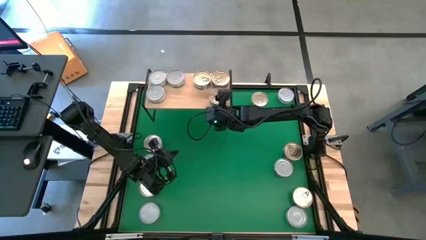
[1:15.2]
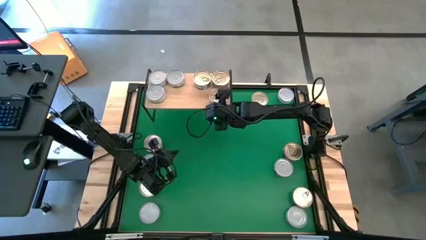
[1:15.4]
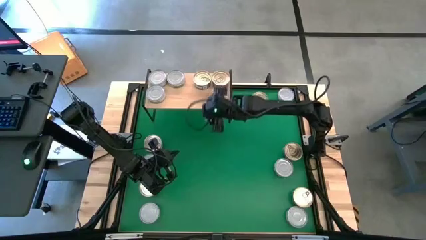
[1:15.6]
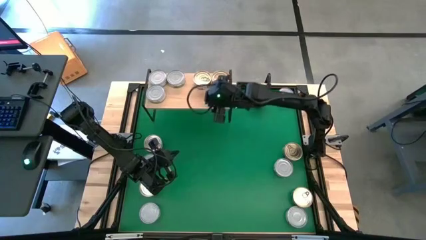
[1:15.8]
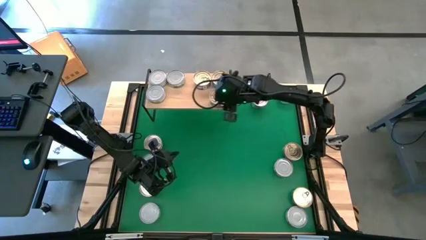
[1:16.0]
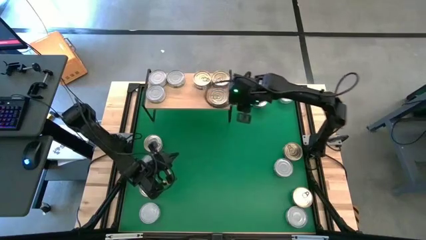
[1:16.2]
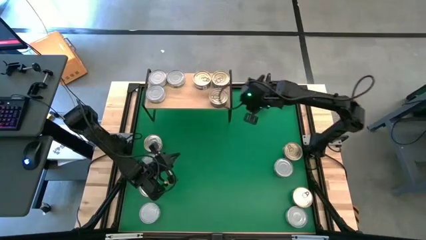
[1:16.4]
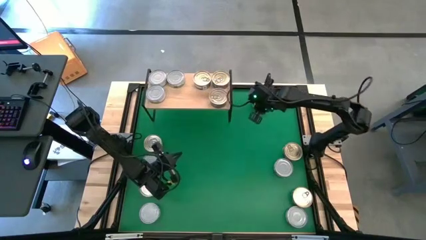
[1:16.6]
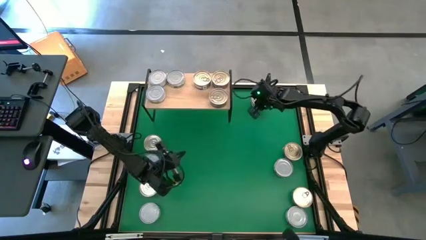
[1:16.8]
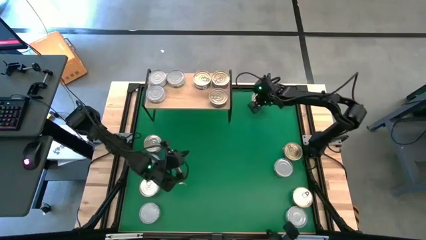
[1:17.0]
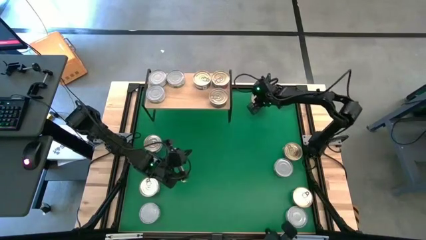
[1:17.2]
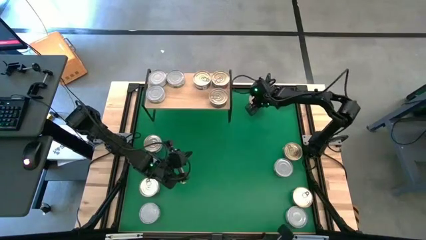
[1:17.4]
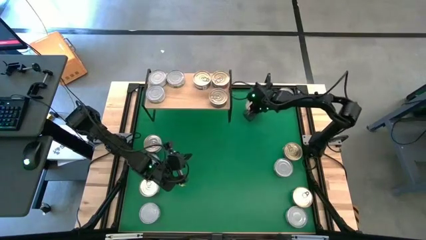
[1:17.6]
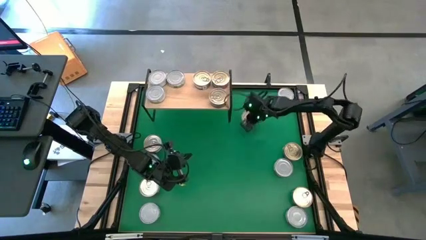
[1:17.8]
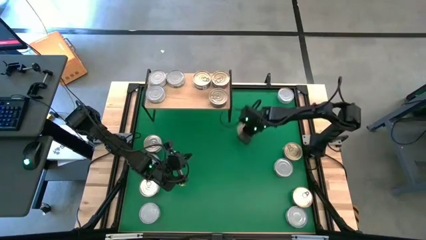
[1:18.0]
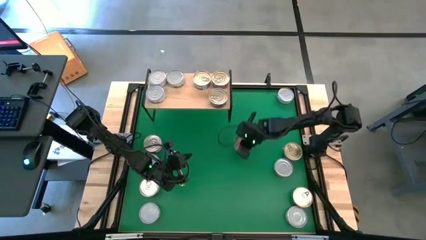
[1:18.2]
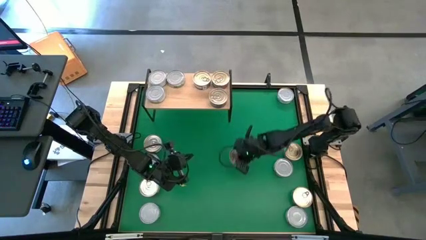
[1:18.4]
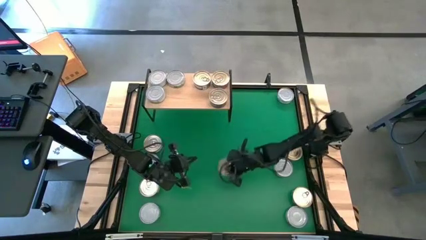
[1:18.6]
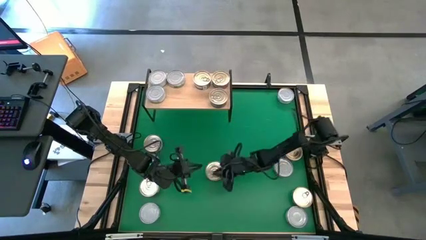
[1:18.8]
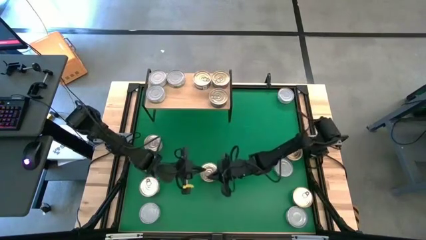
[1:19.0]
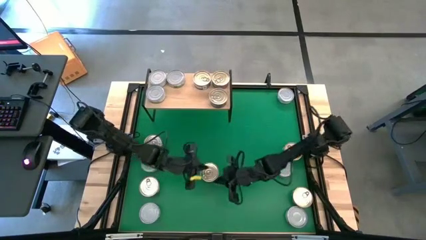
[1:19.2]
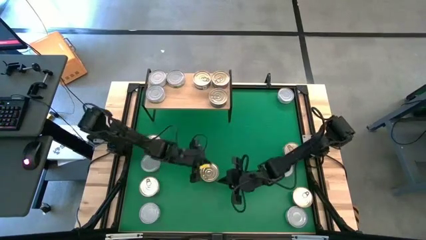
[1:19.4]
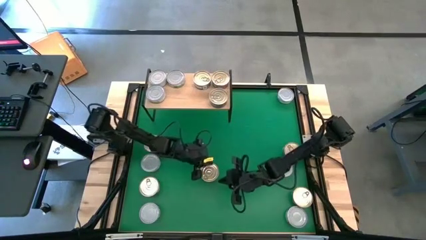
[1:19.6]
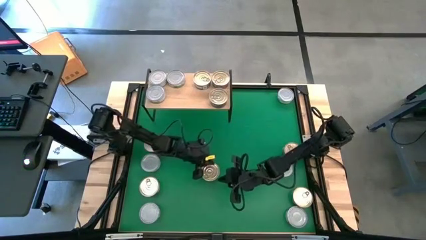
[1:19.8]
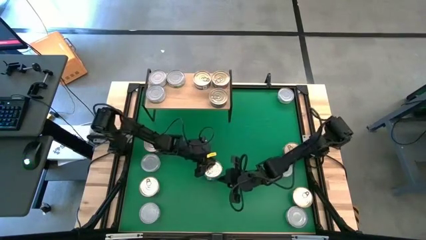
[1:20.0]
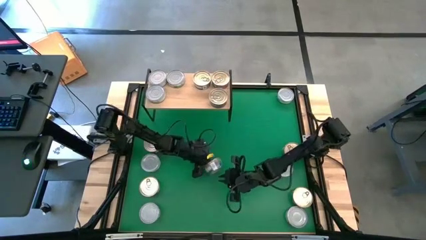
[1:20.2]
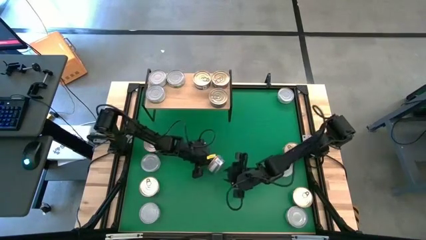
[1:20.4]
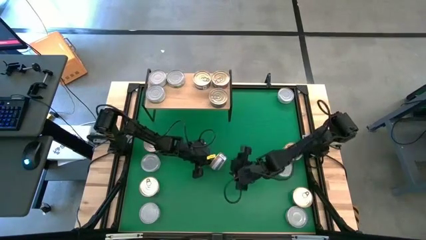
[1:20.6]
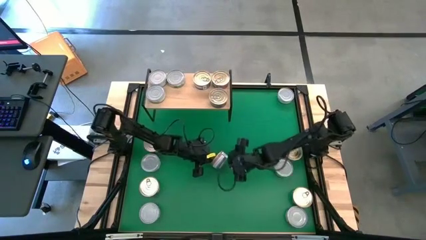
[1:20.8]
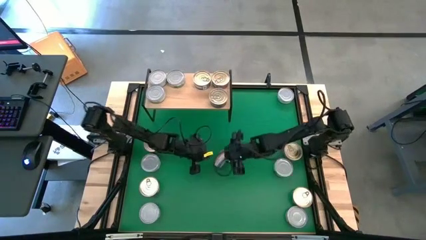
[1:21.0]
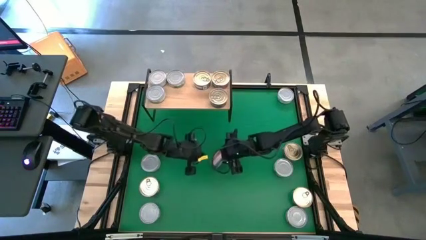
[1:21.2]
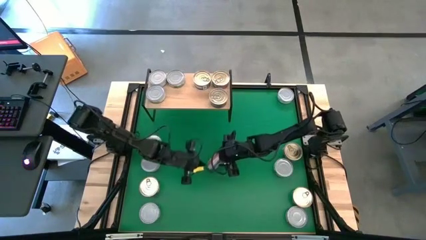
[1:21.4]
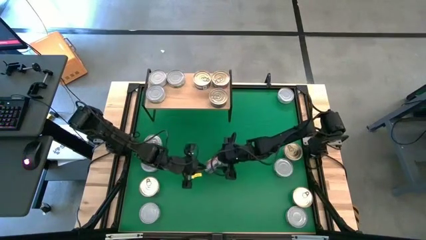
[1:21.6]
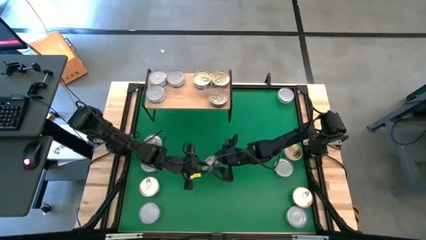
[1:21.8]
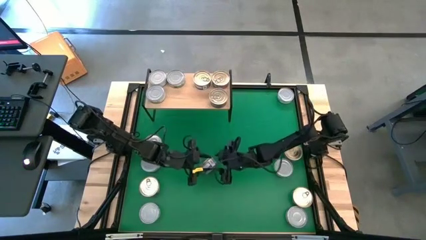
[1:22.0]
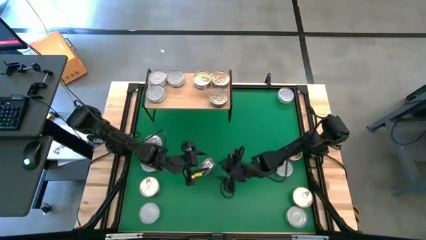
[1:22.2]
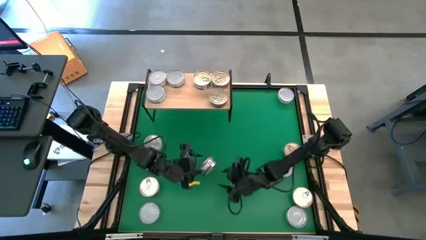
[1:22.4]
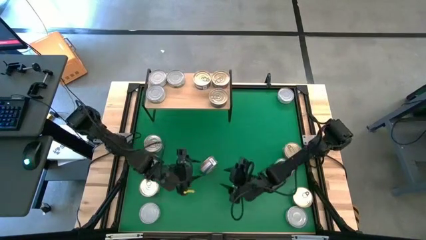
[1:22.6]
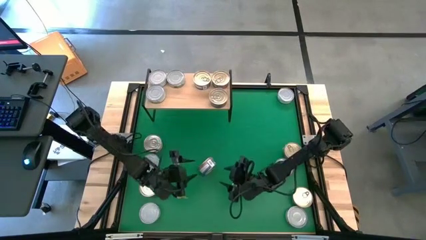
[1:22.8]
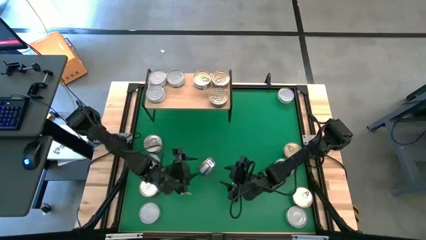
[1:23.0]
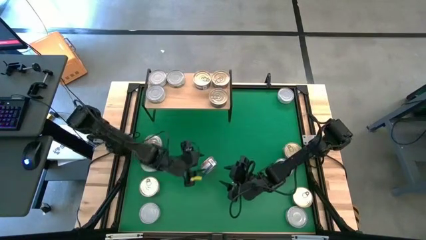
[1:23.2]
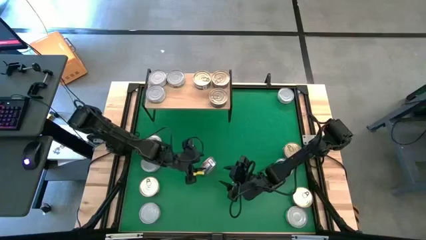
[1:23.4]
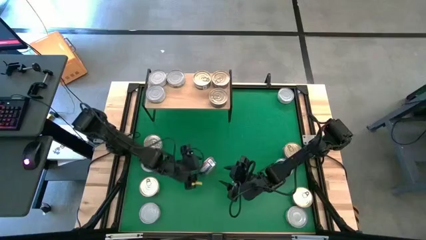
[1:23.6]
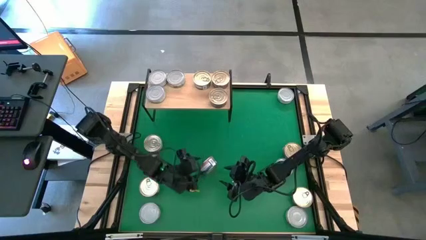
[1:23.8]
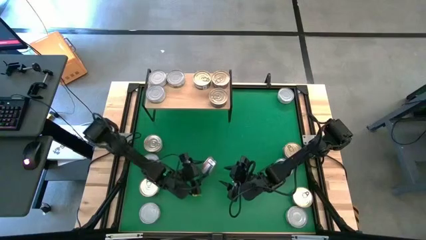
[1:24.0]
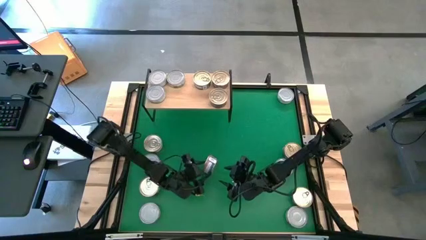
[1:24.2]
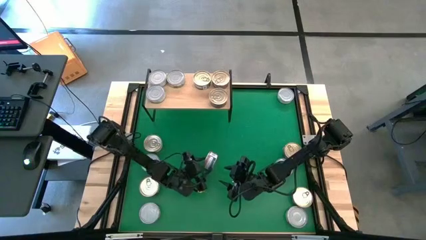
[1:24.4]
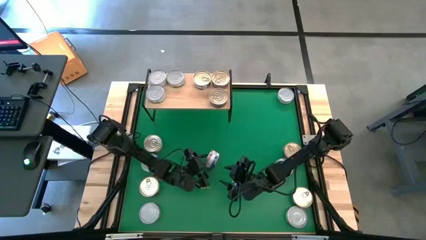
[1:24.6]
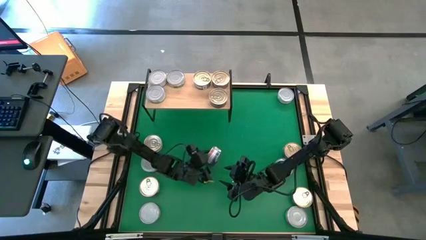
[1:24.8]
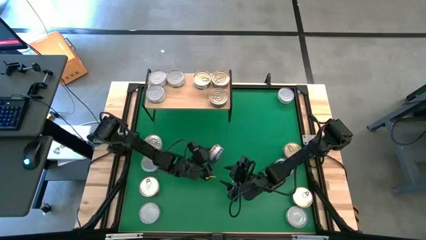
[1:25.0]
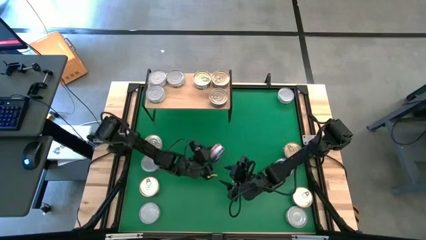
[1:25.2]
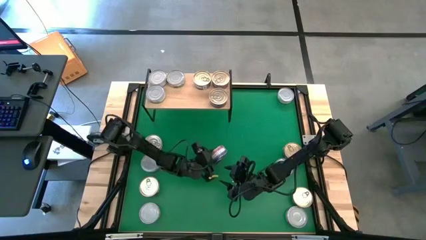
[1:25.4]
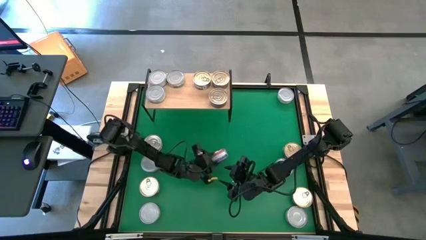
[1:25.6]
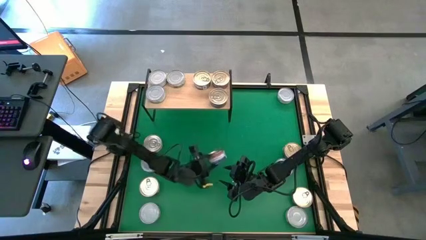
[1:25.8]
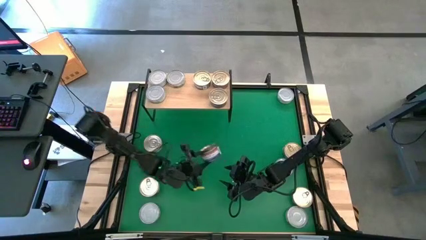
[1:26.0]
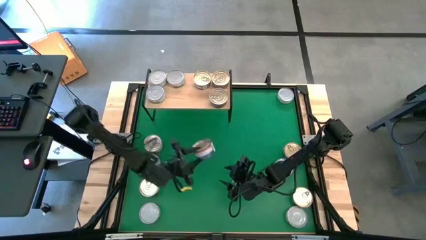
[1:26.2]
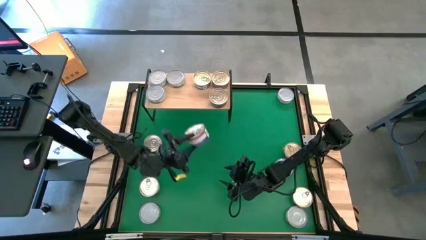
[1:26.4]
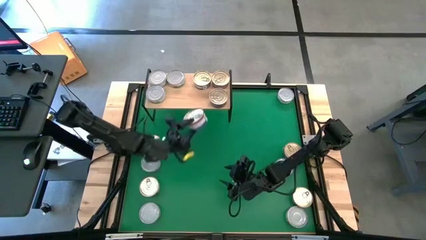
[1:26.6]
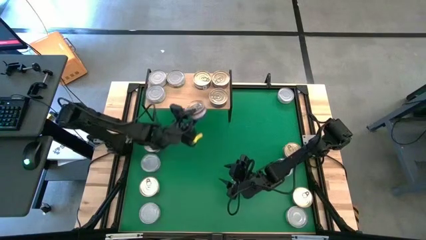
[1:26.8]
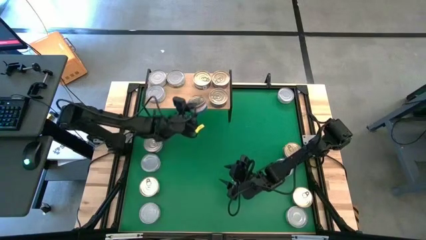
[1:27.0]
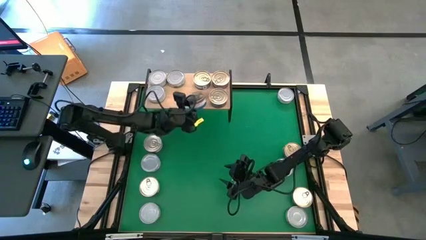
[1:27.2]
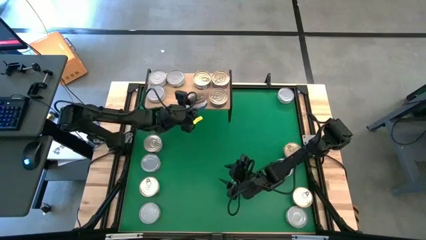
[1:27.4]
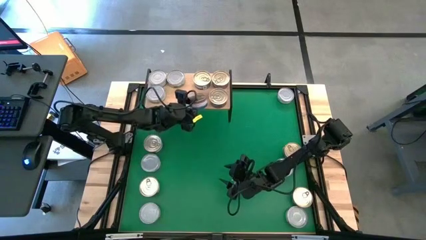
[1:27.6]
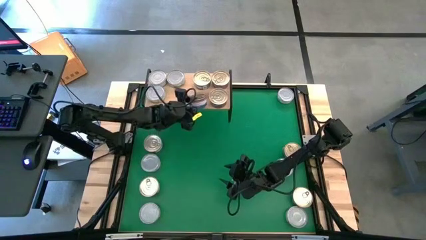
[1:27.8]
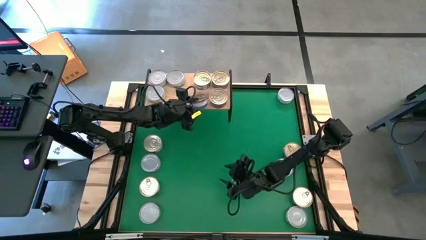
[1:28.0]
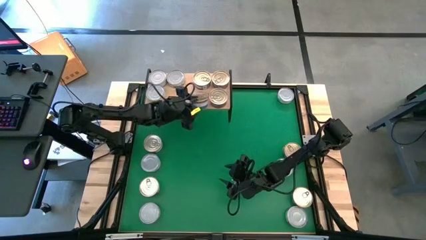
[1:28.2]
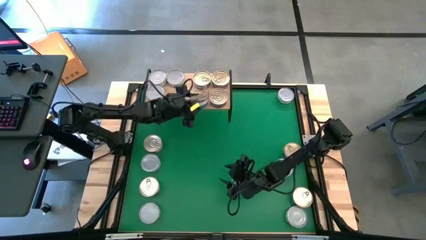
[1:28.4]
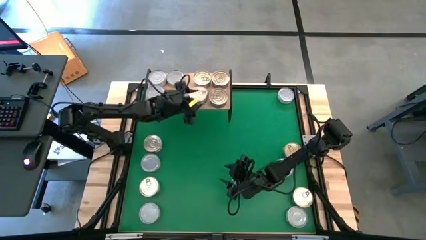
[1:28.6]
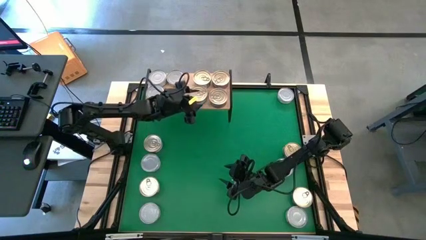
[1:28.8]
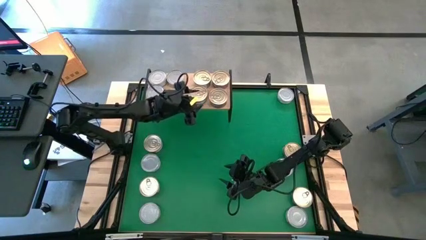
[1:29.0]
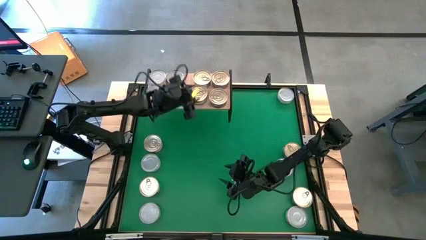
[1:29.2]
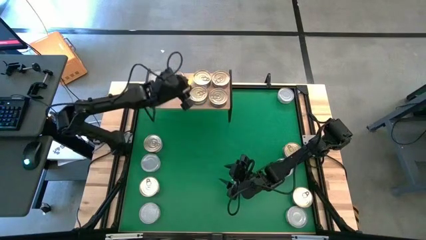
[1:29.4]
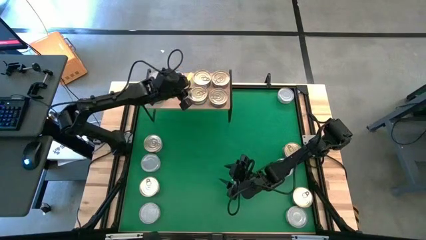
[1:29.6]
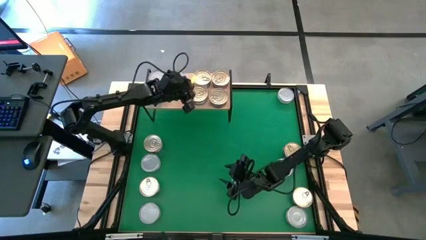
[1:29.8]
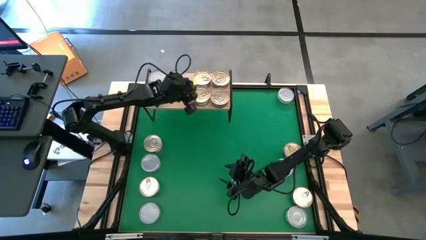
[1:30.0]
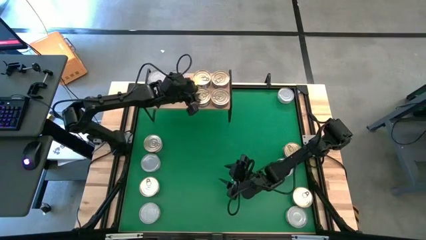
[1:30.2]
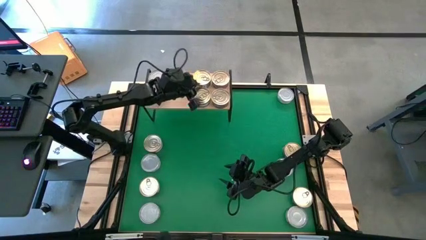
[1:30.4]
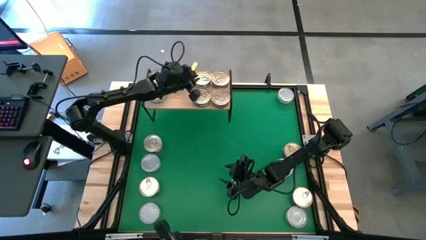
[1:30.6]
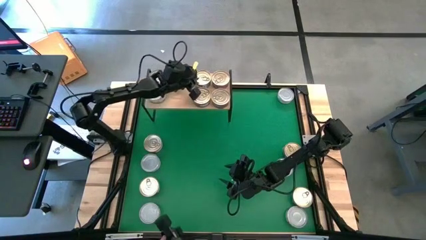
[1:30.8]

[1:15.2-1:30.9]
Task: Stack canned seafood by type on shelf
Put the blue-pink tuna can on the shelf
